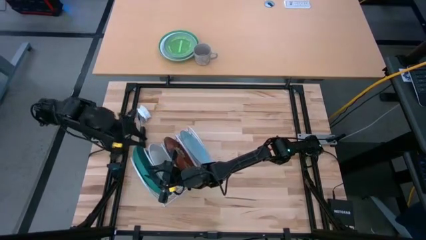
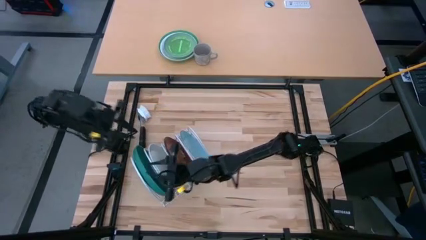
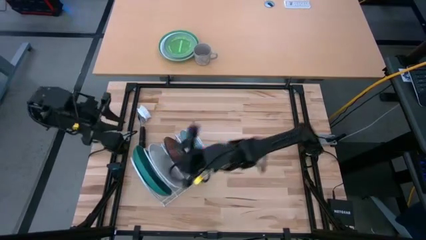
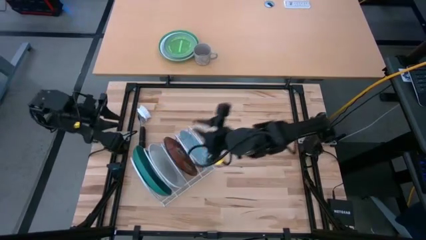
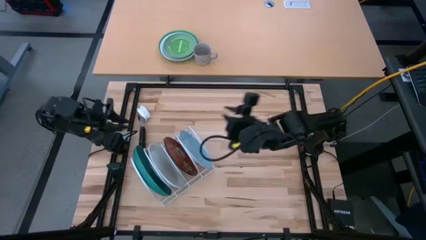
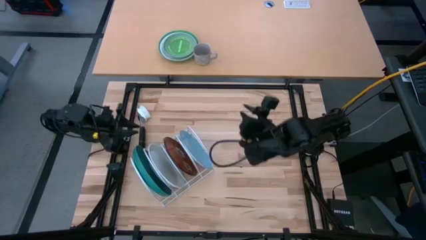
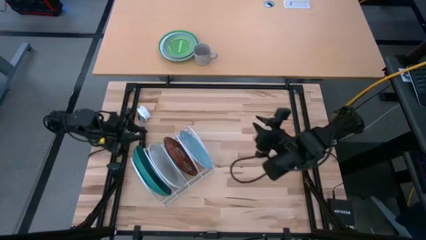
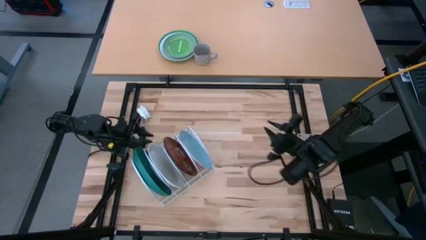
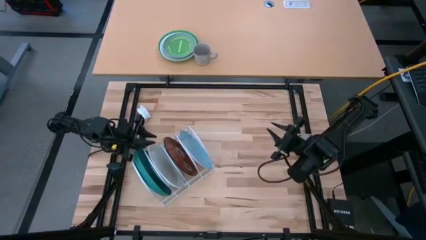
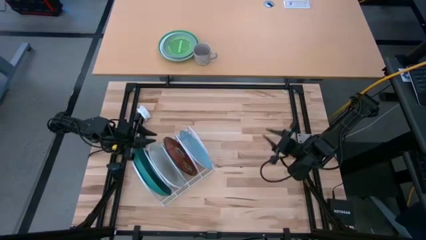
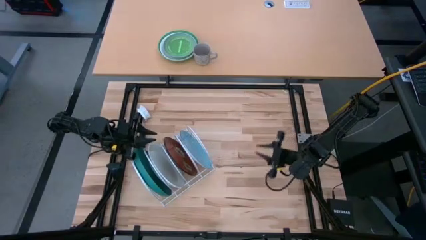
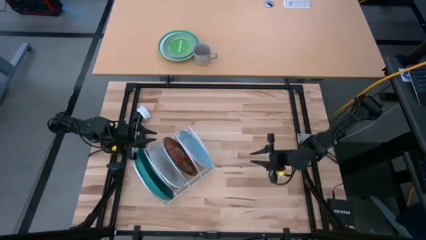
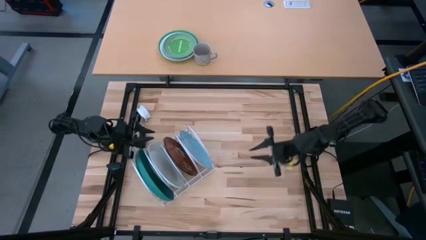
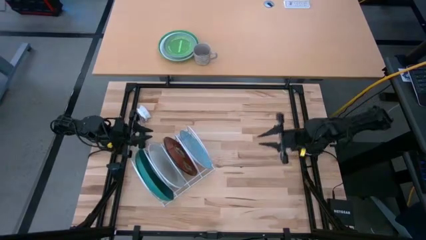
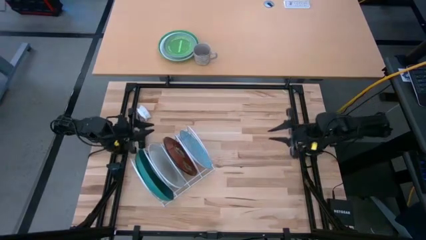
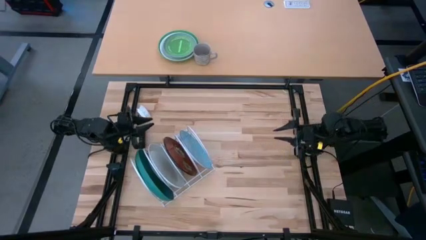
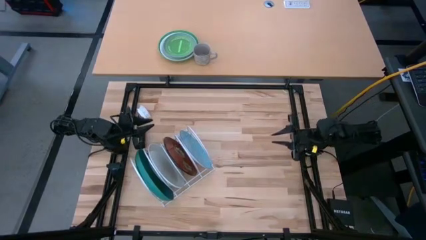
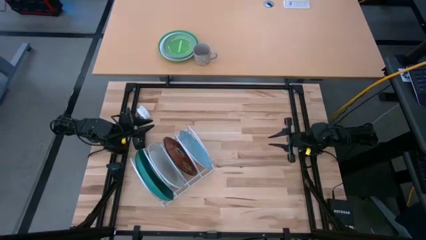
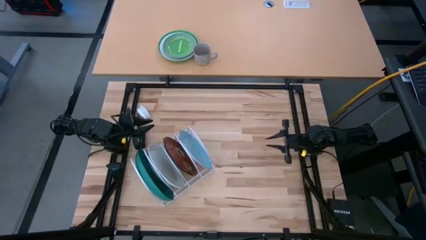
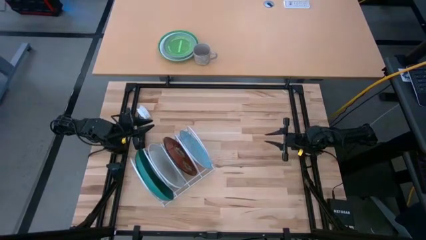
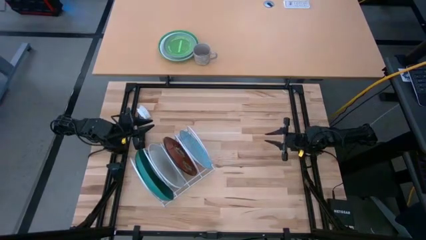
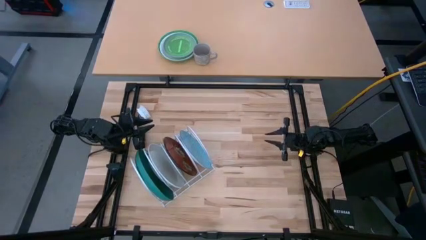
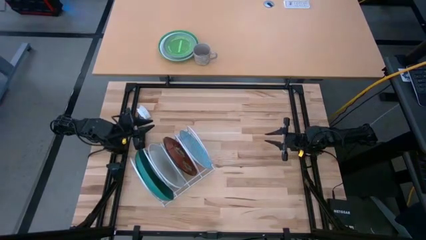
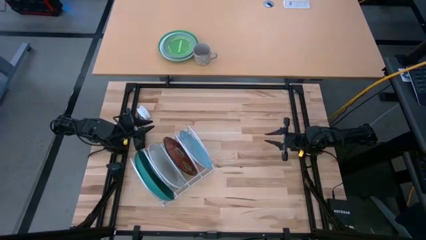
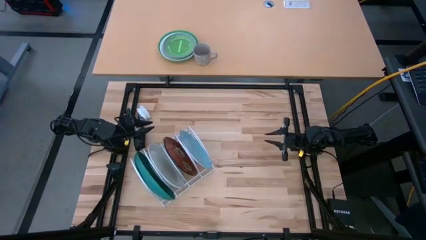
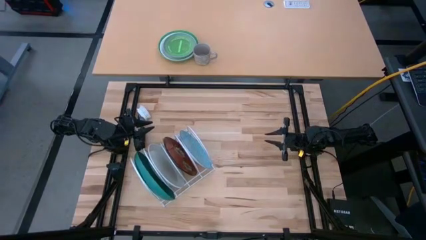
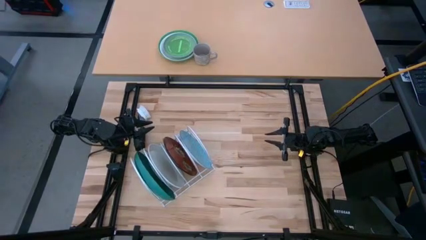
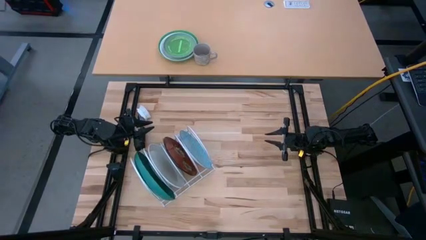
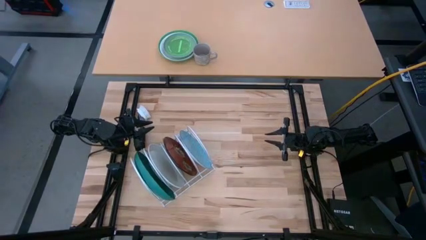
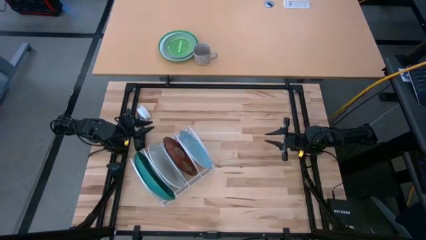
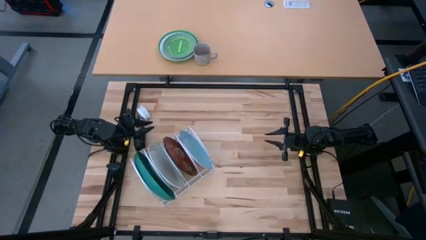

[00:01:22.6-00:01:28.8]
Task: Sort dishes
Return to Home Position

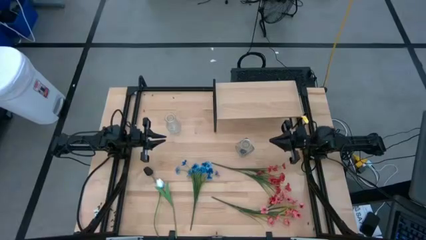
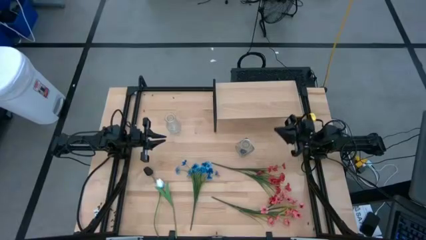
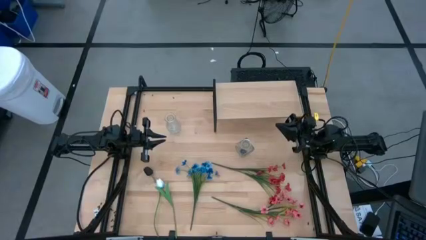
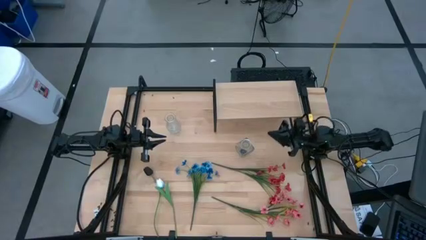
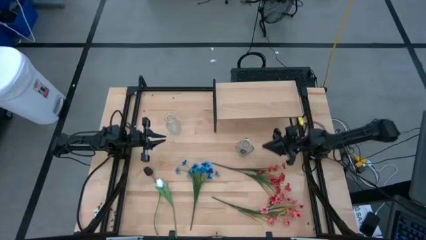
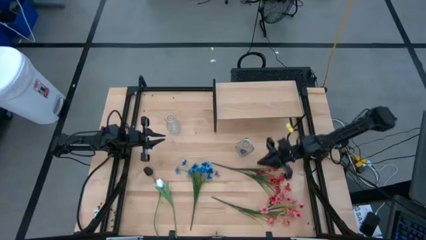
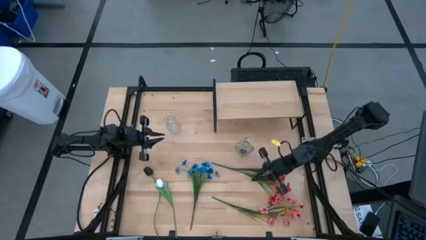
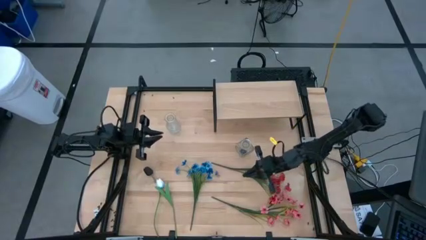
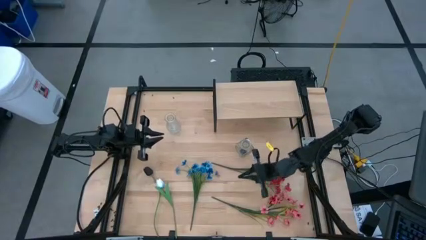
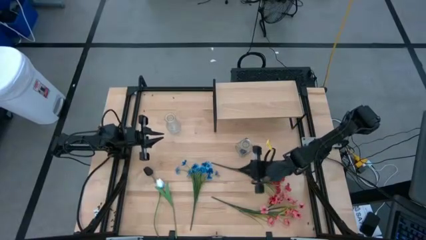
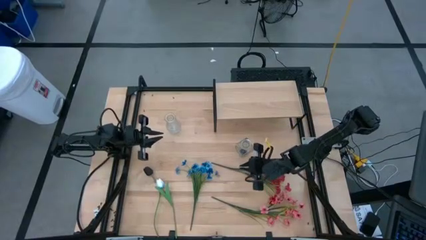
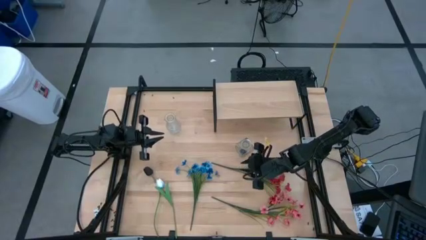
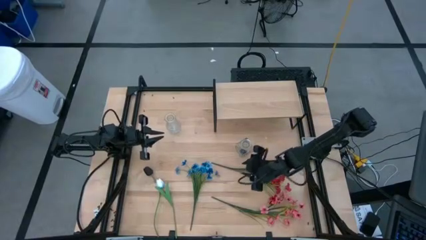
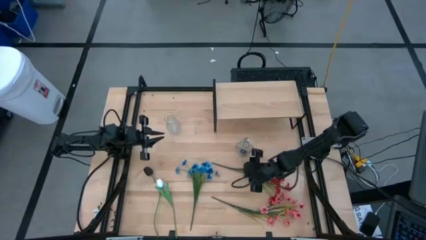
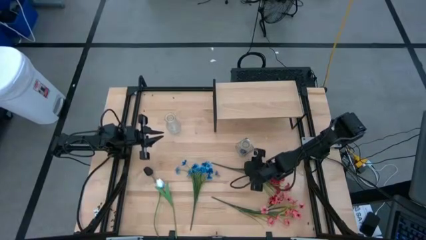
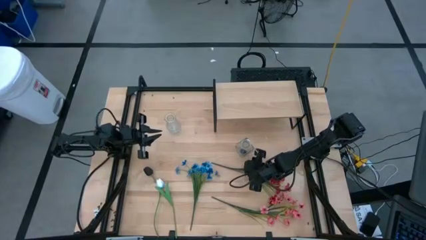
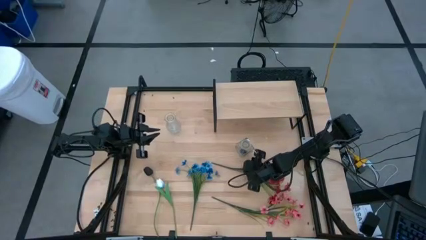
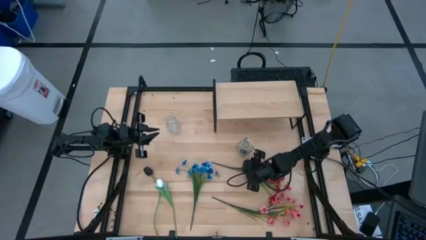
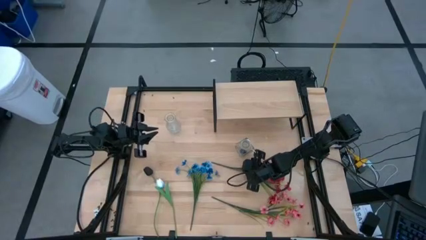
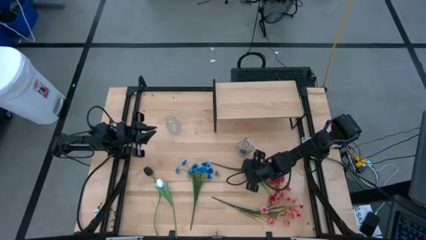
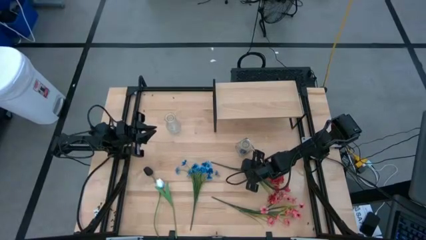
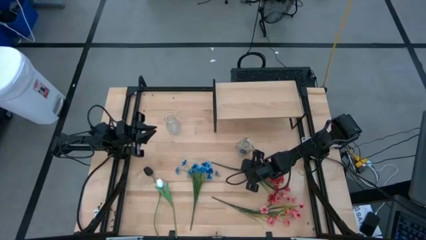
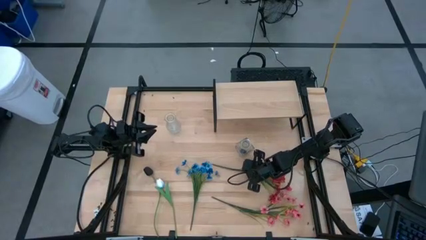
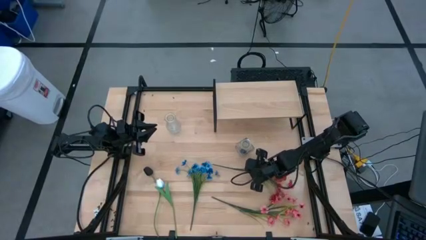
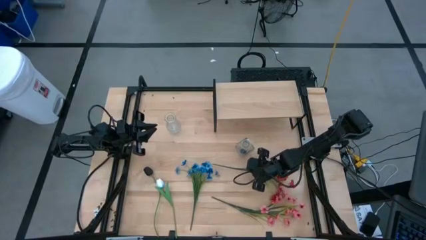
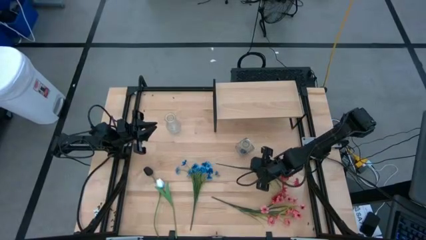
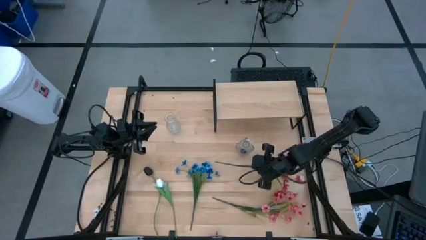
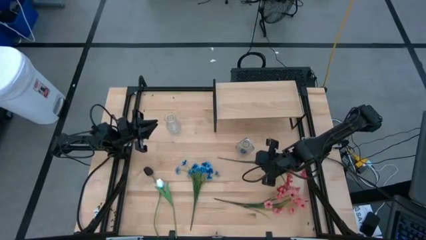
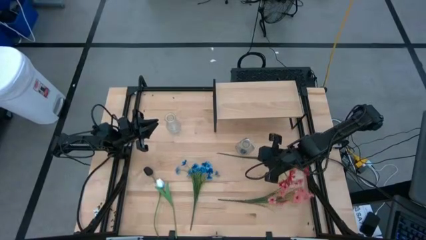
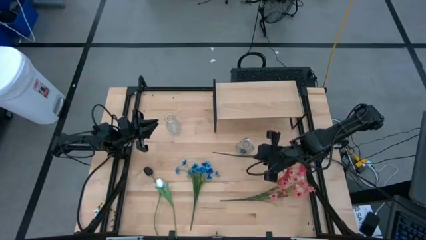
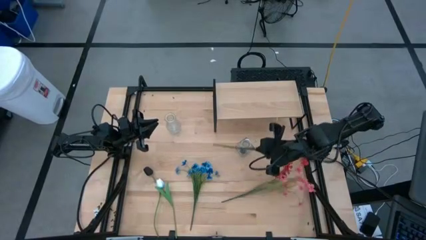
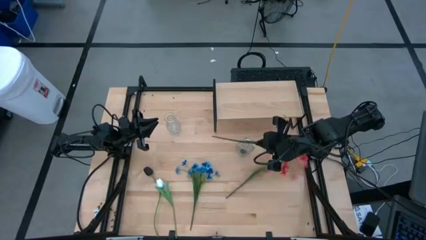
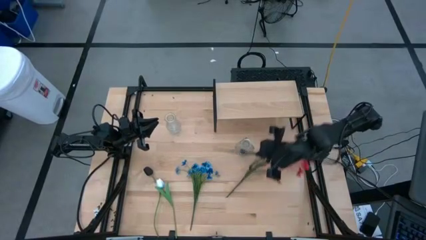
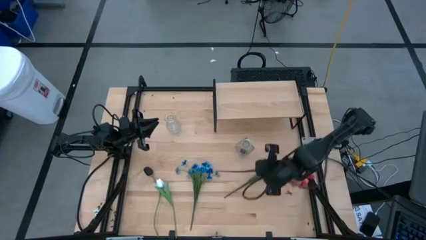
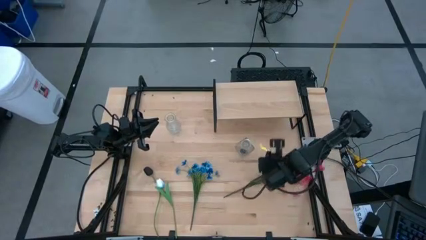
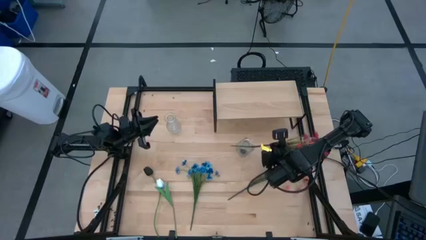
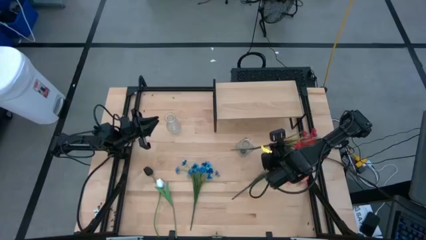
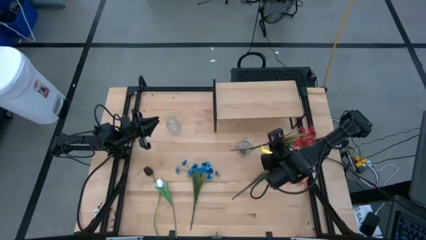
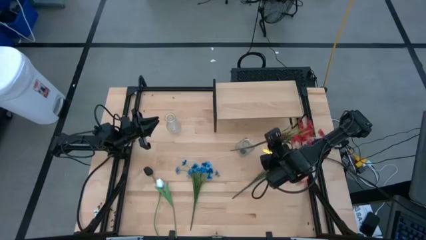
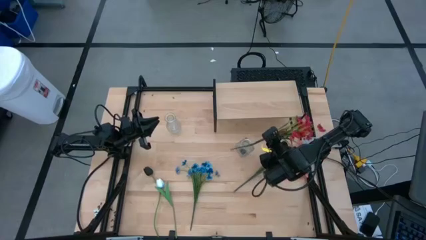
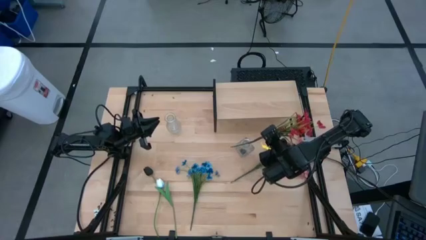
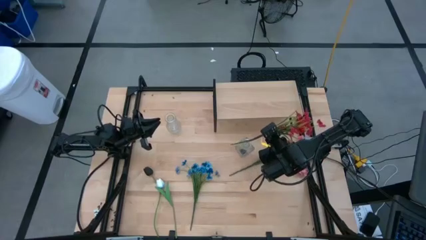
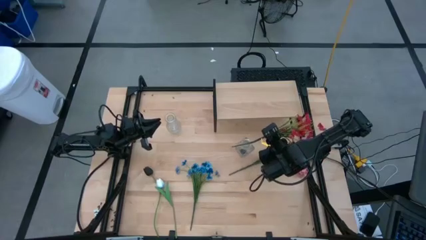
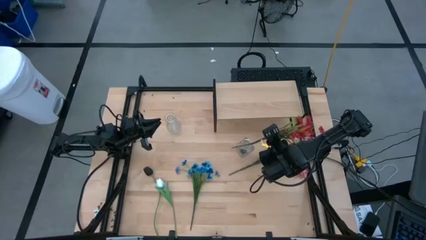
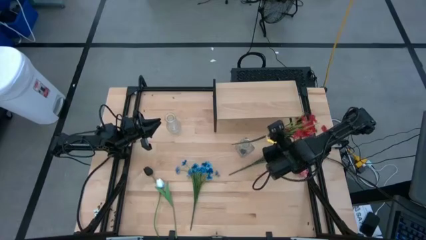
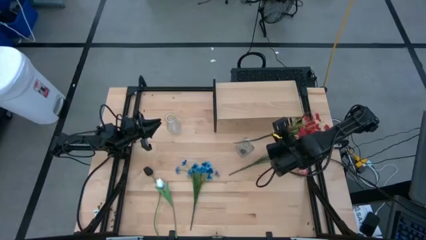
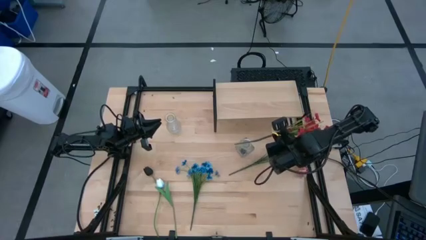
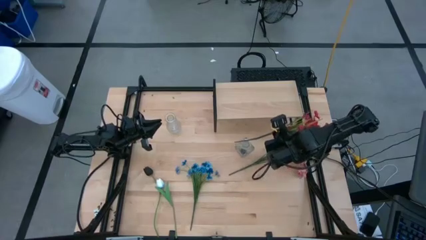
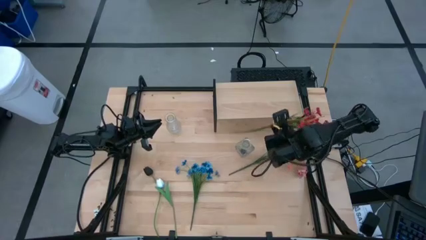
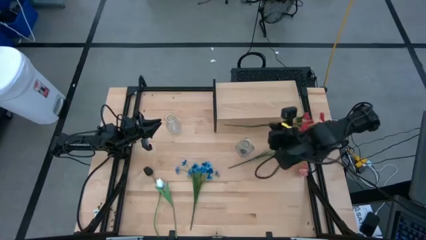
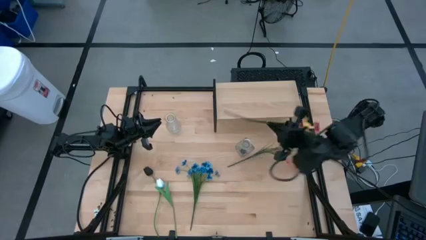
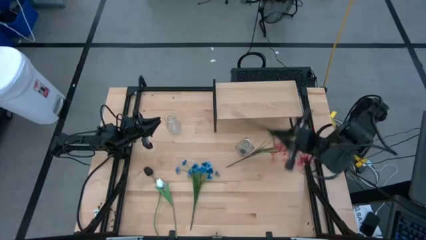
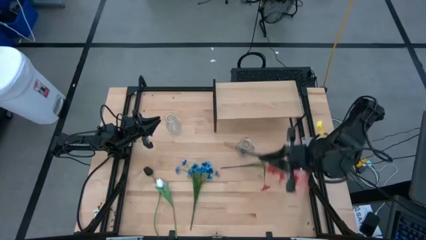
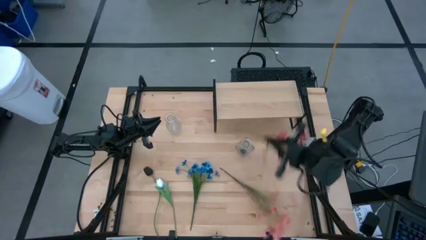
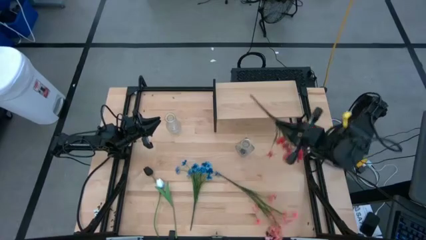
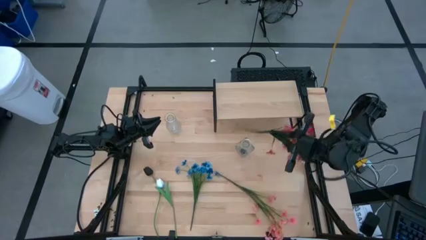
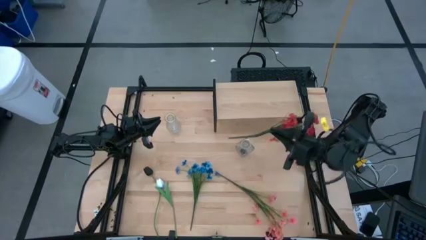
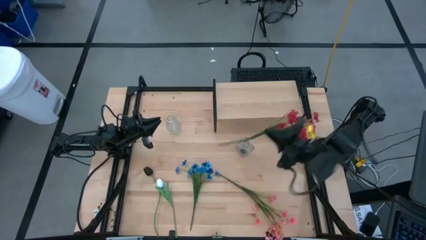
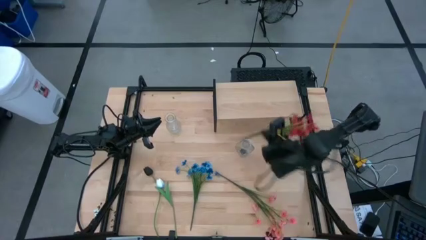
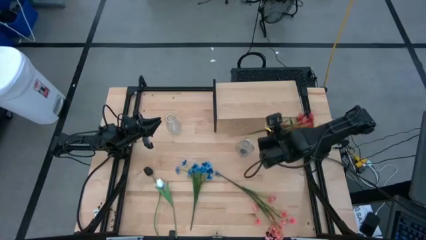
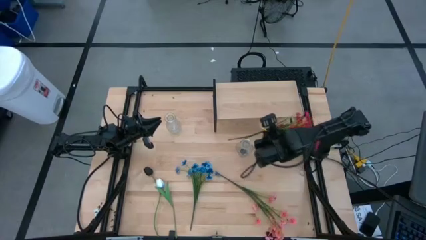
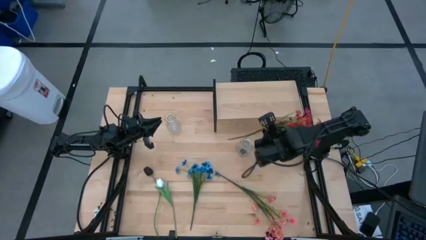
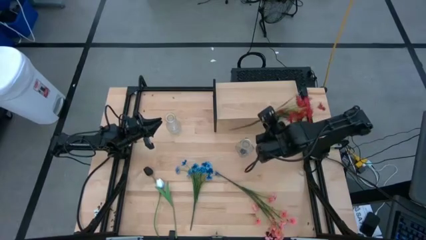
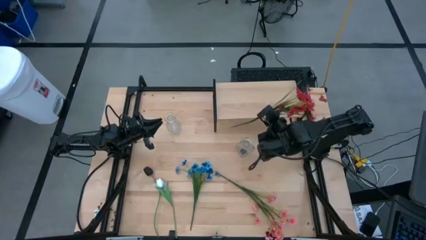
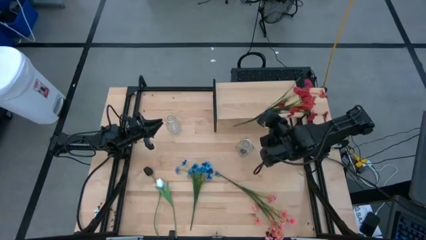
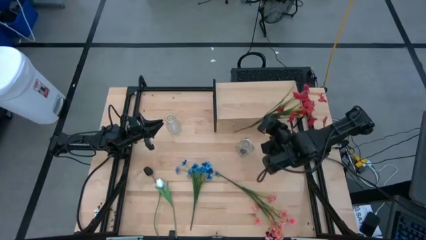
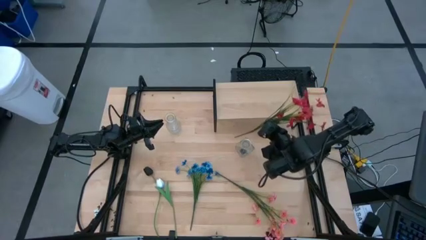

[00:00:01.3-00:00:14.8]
Task: Pick and place flowers into a vace then onto a shelf
Put the red flowers into the right transparent vase
